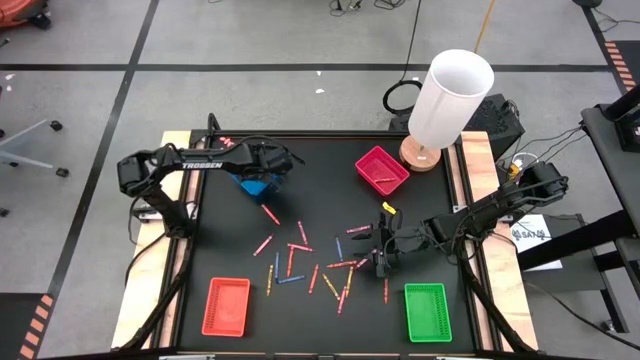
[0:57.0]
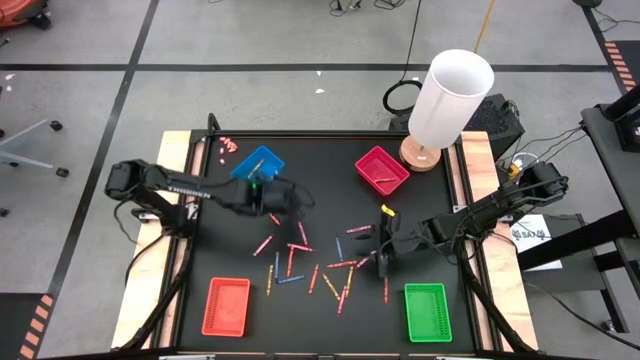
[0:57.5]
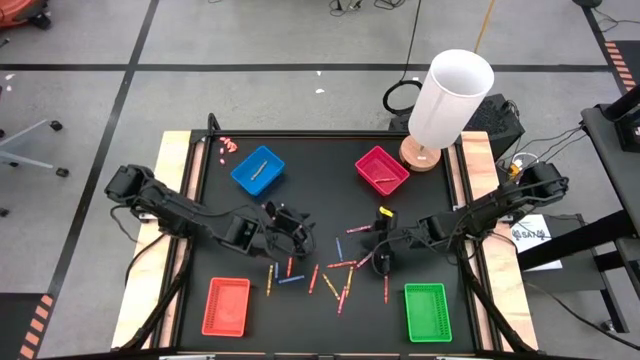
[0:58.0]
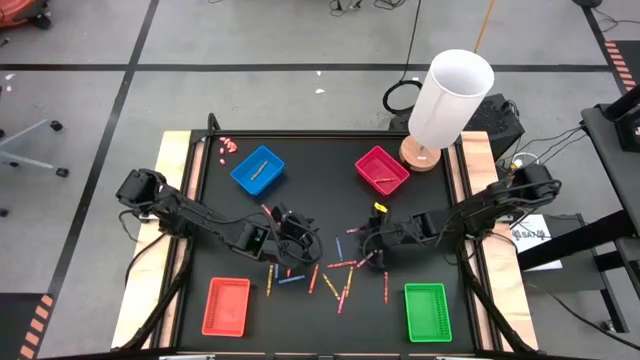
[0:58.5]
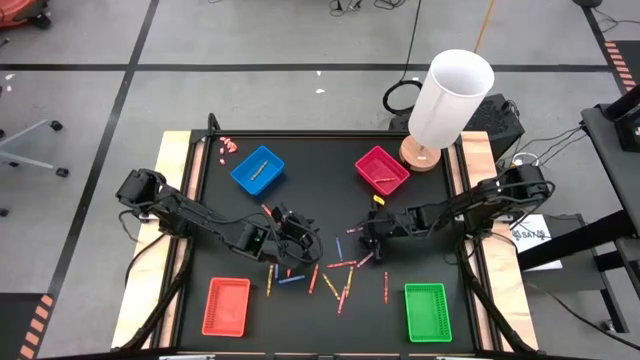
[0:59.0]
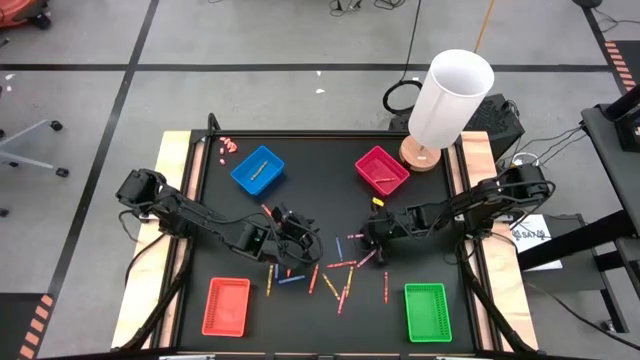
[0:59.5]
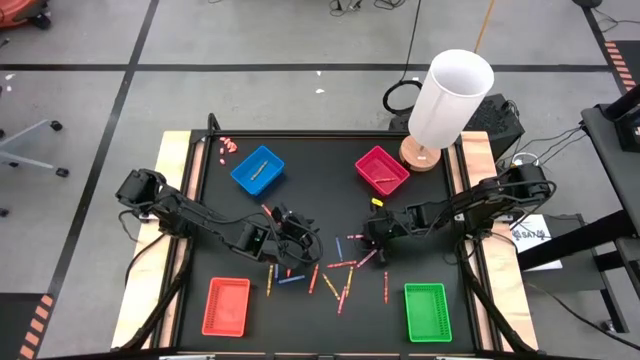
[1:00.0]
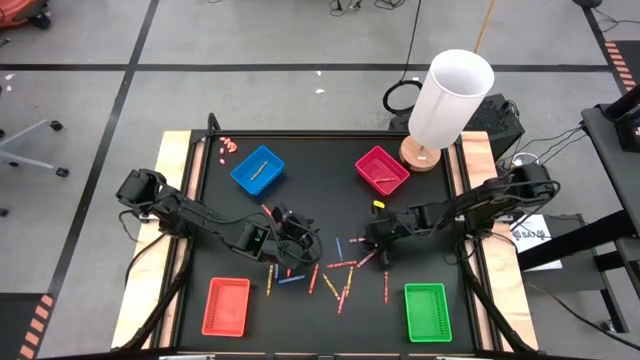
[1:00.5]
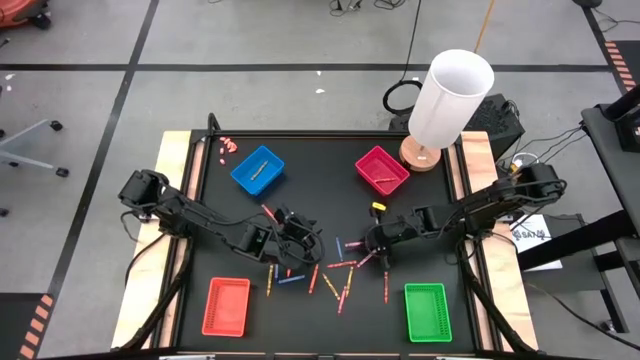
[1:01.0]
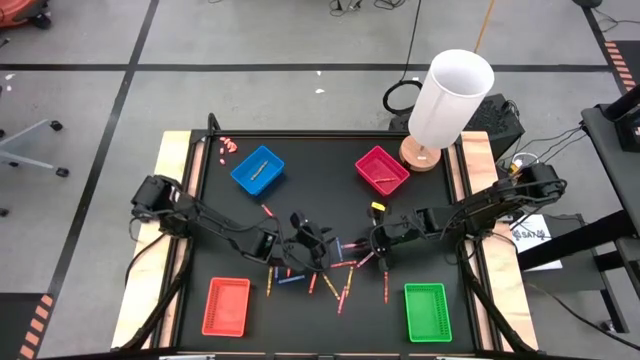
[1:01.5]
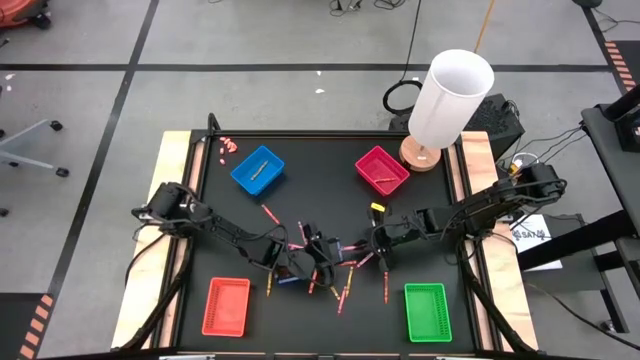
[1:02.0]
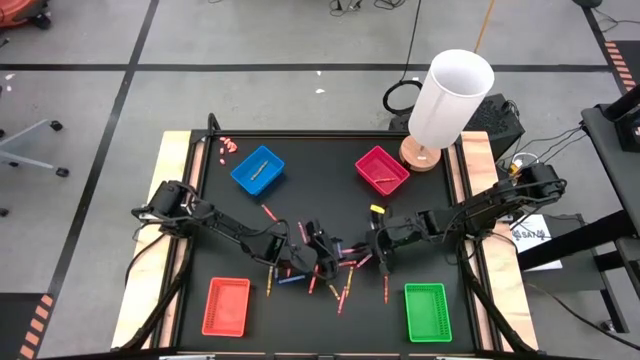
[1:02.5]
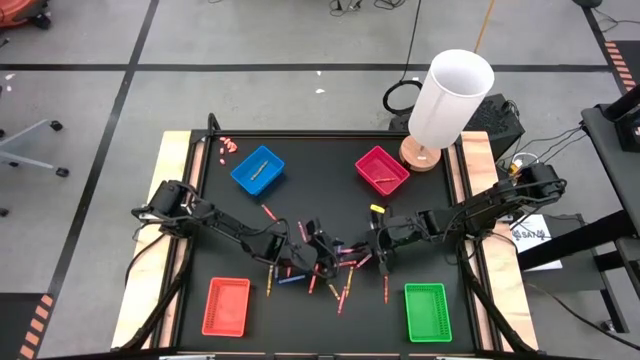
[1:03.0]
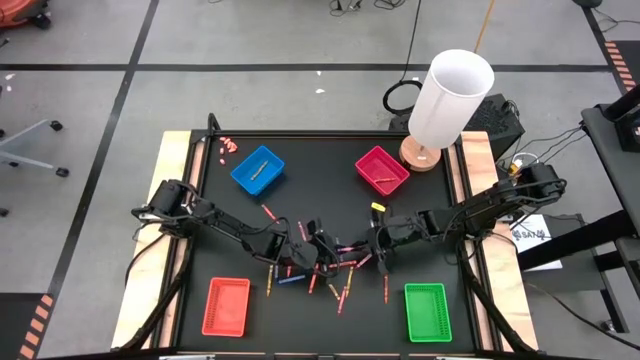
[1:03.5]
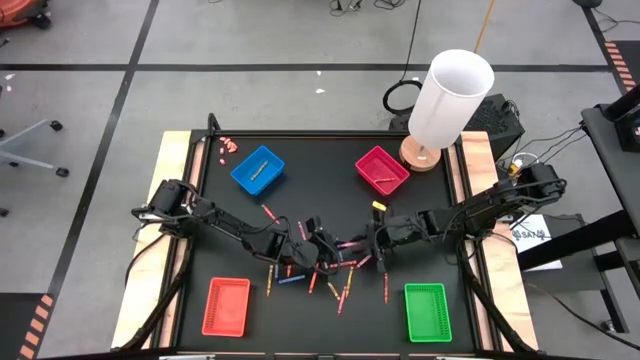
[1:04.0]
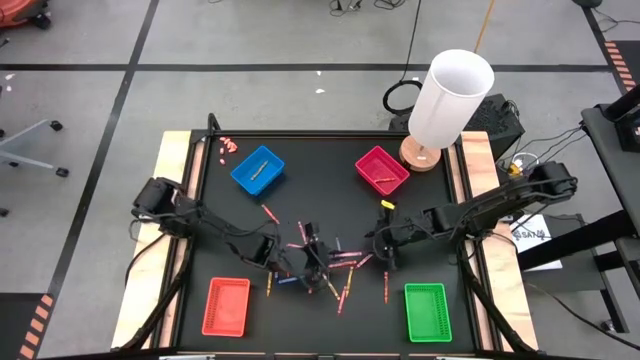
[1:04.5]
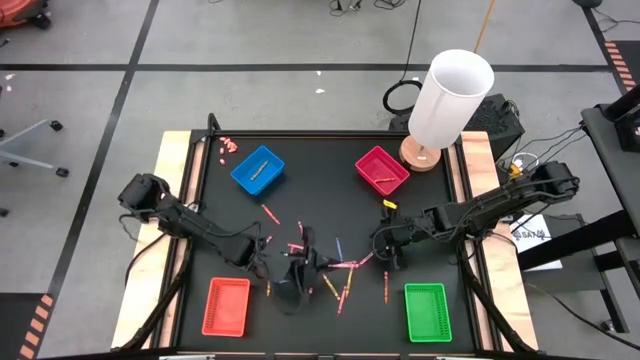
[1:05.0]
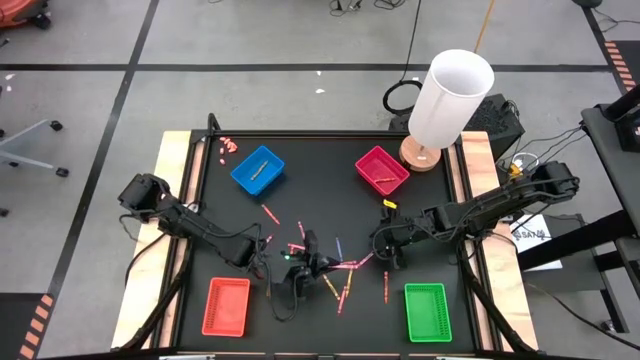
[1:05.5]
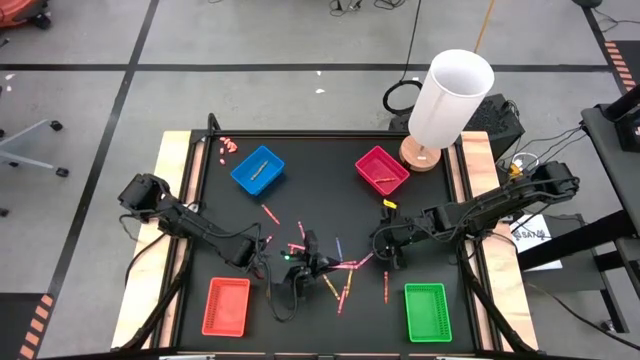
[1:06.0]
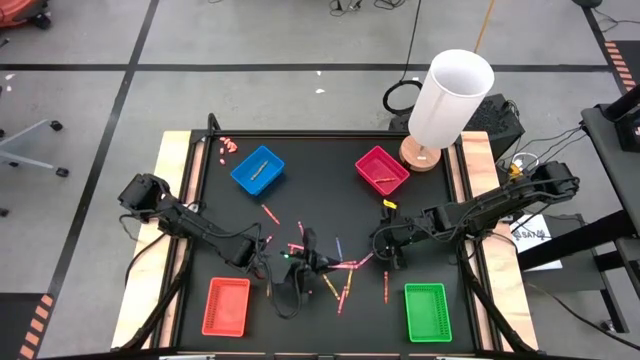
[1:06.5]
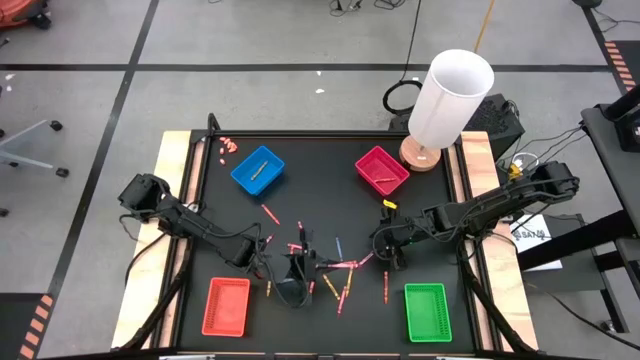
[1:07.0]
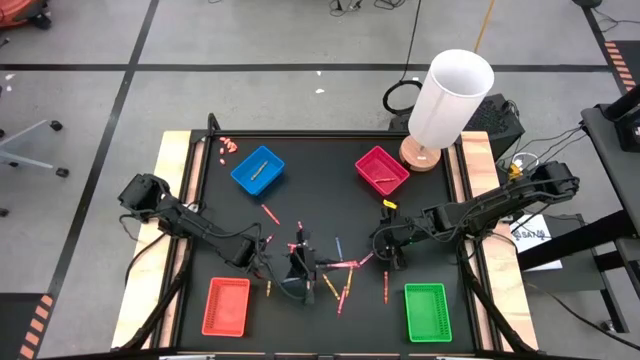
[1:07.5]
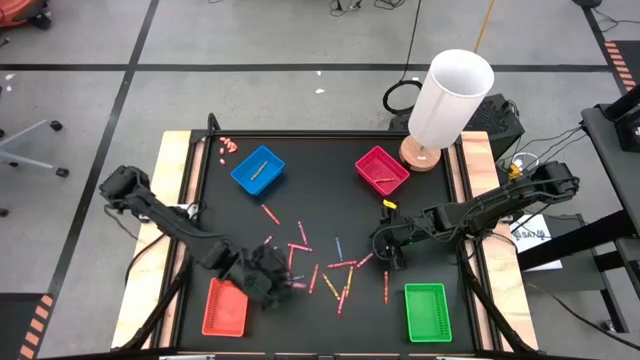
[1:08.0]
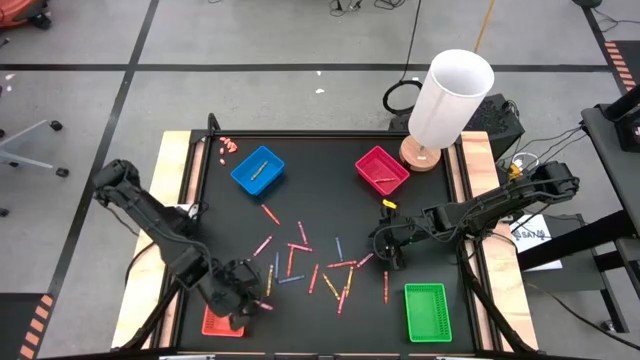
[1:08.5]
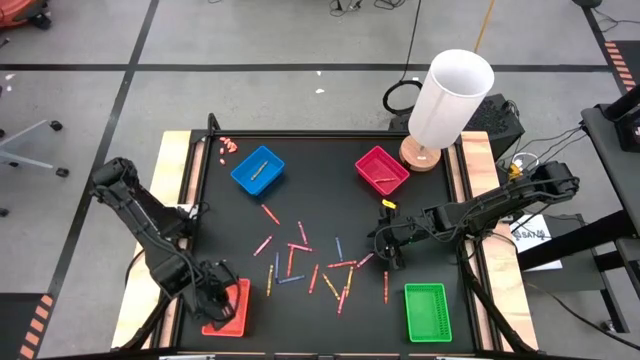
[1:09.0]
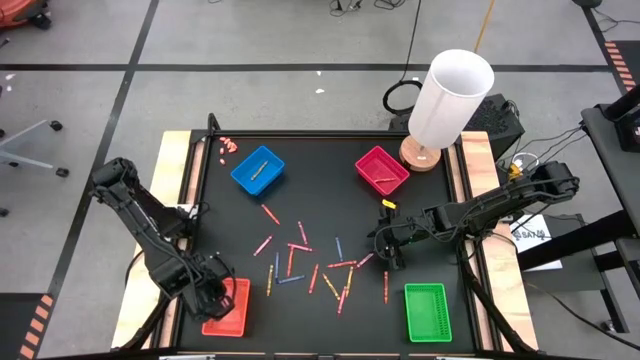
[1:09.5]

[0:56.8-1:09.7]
Task: Sort crayons
Put the red crayon into the orange bin

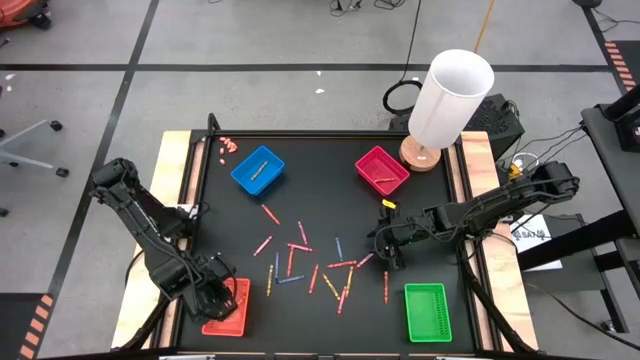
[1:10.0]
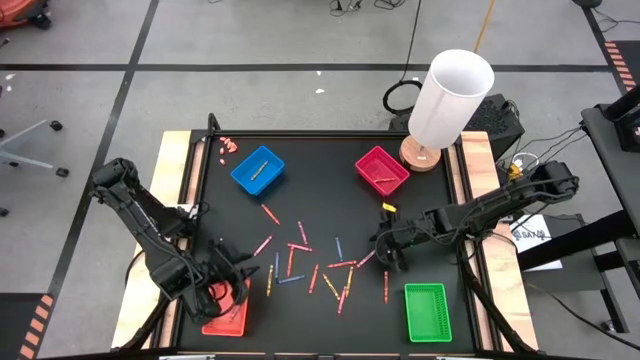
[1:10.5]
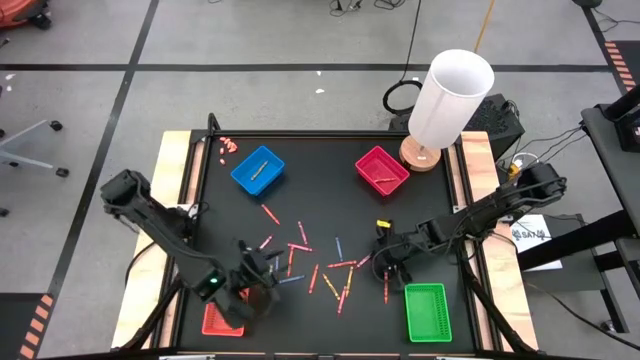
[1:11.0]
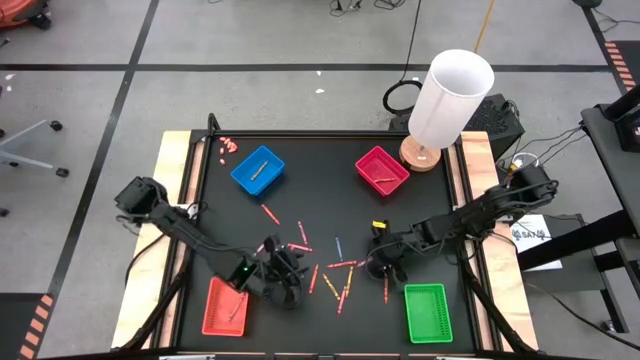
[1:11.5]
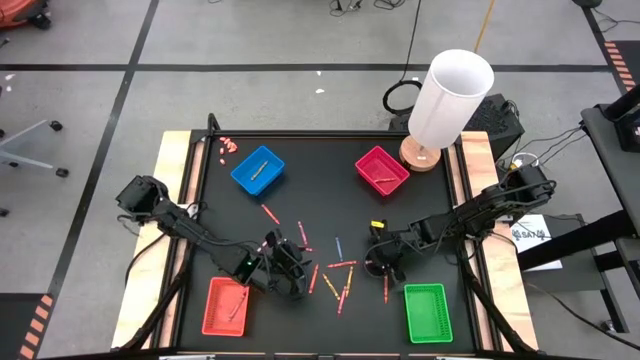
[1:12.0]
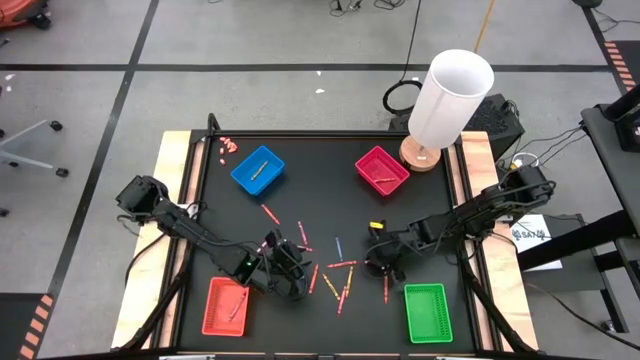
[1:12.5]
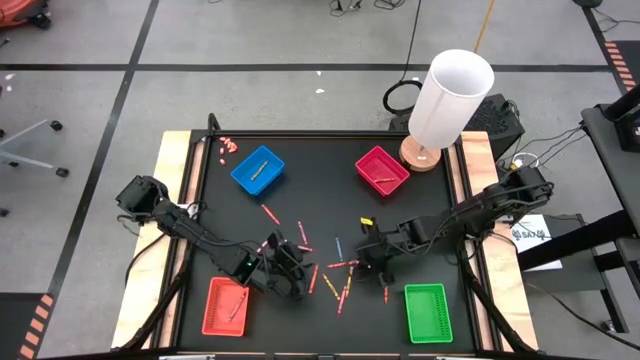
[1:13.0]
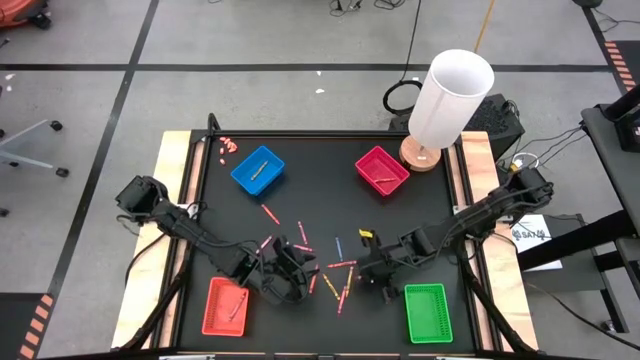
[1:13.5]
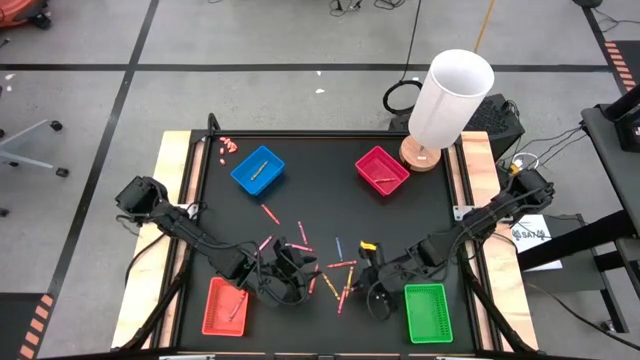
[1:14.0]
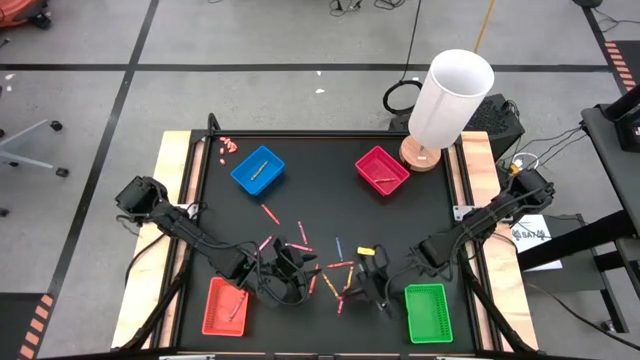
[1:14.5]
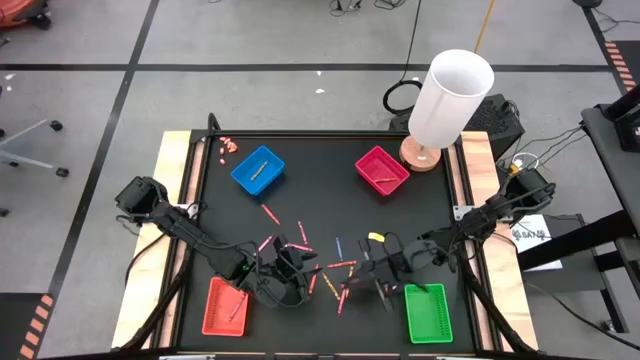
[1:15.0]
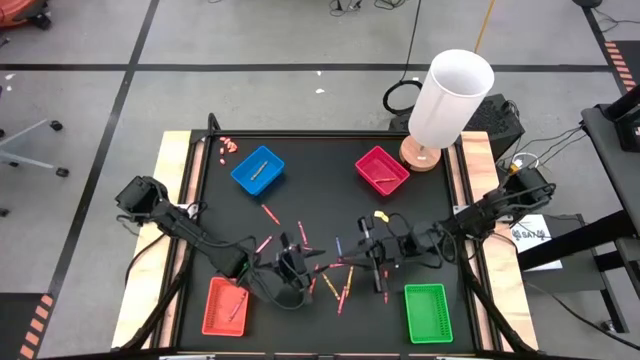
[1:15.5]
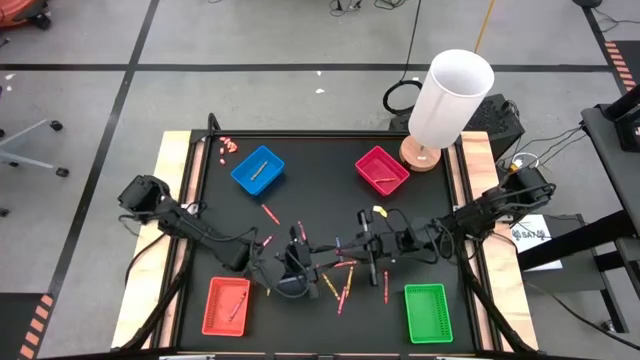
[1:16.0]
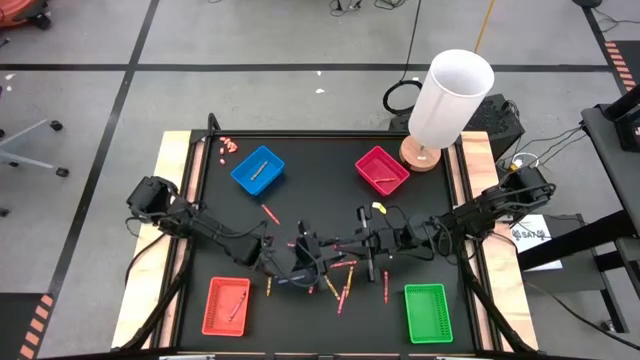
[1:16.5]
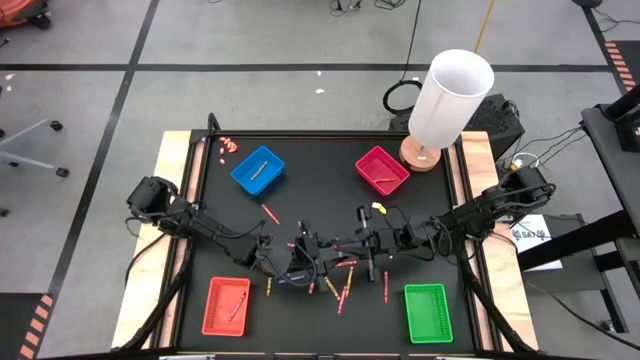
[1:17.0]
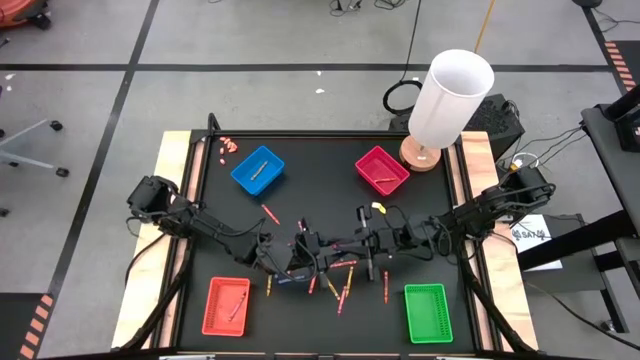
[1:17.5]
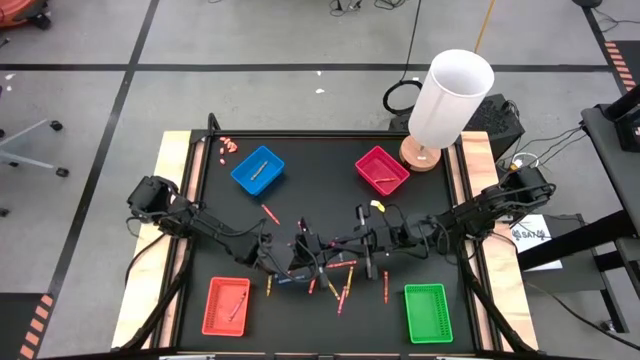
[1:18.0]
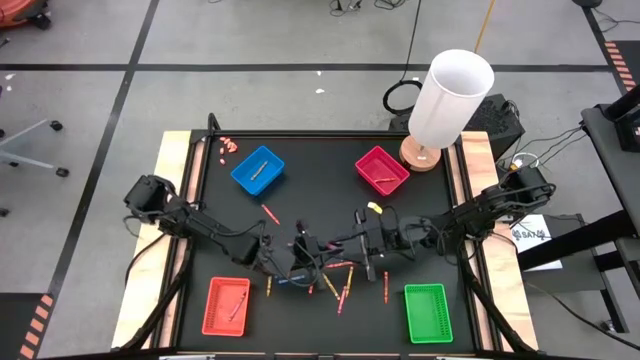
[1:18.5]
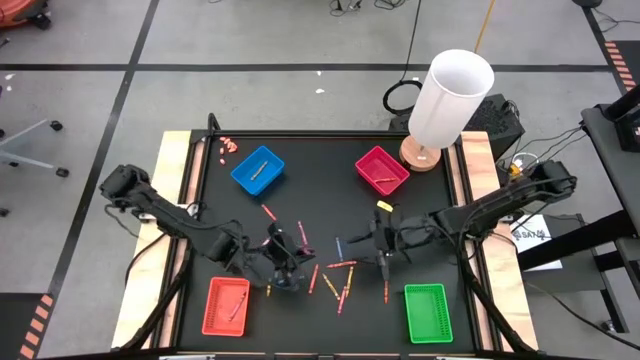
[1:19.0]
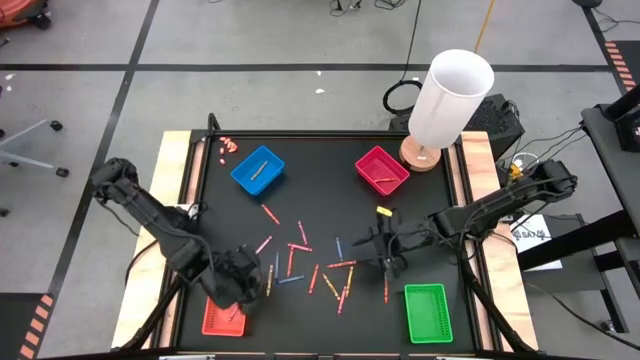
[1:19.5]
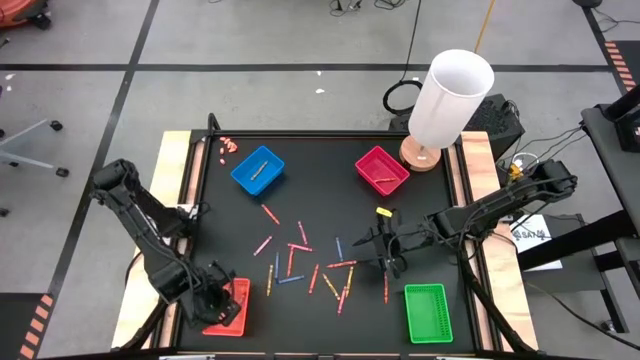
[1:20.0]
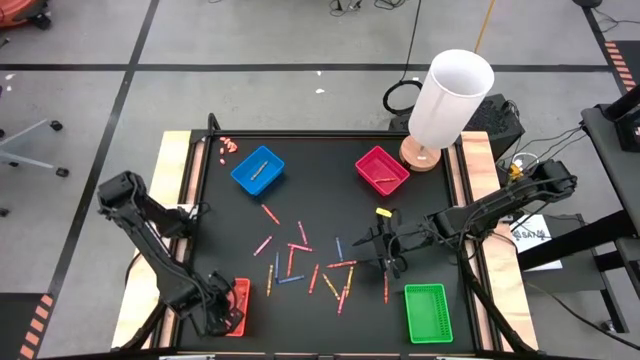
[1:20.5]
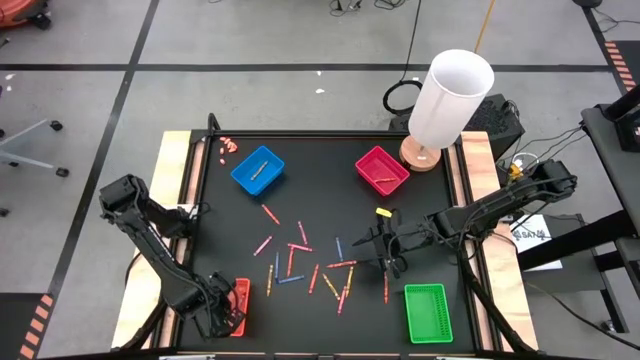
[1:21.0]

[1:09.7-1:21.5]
Put the red crayon into the orange bin
